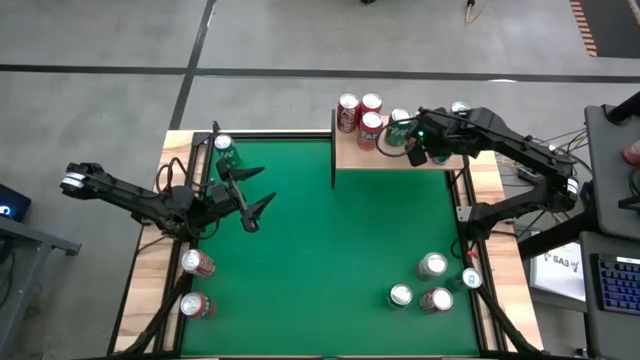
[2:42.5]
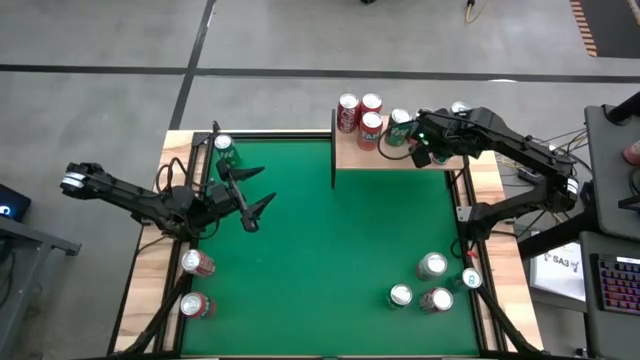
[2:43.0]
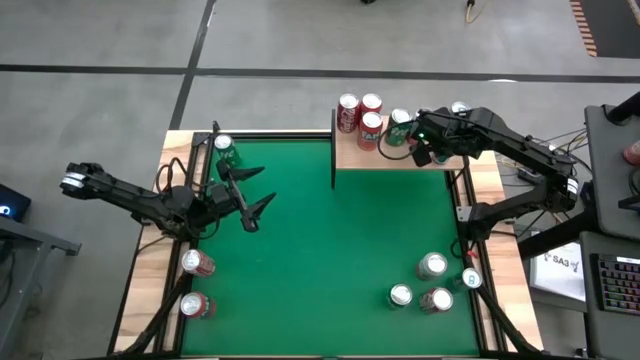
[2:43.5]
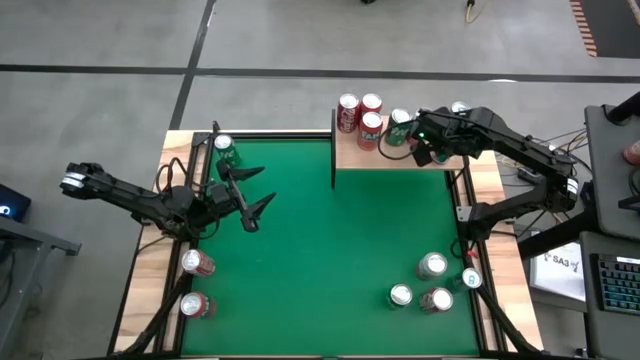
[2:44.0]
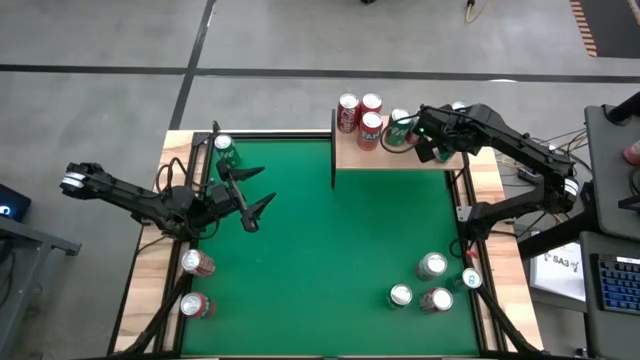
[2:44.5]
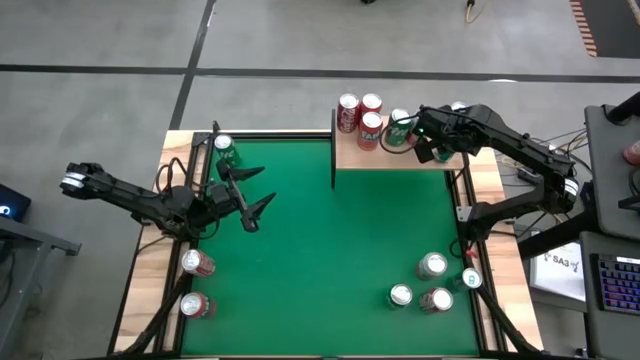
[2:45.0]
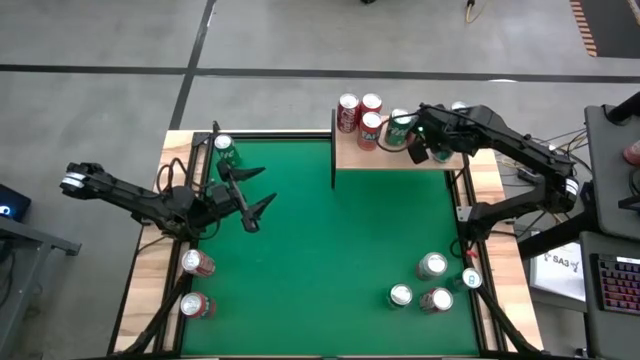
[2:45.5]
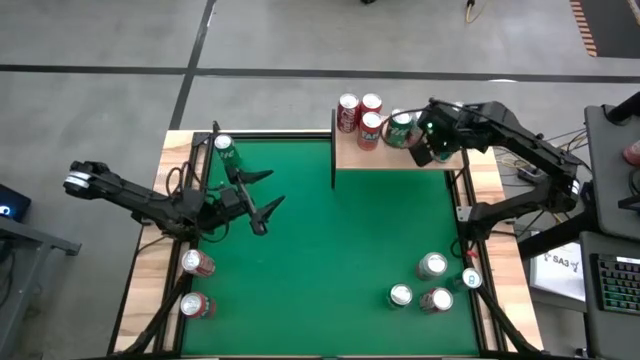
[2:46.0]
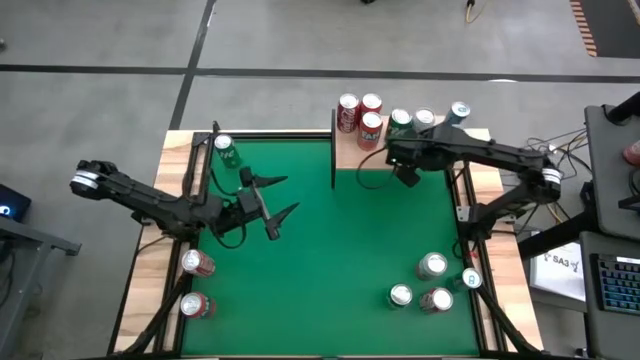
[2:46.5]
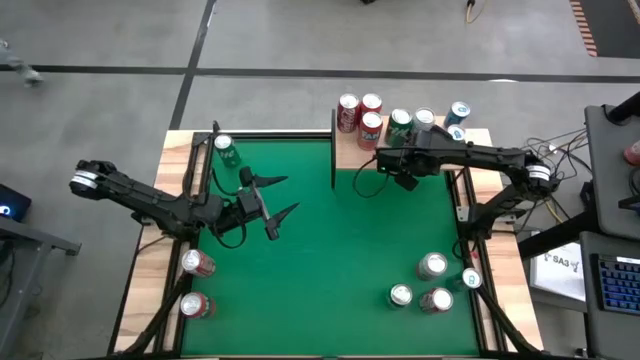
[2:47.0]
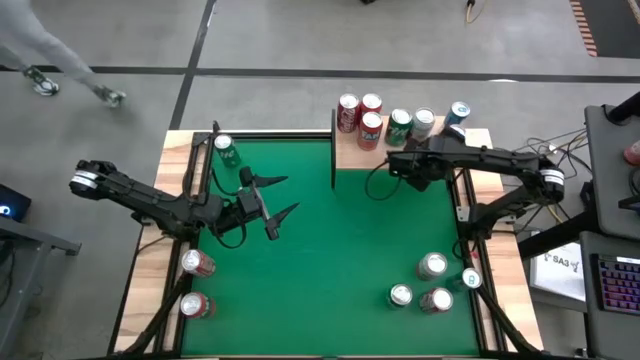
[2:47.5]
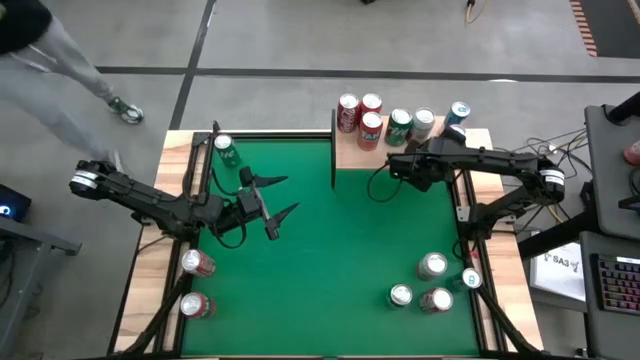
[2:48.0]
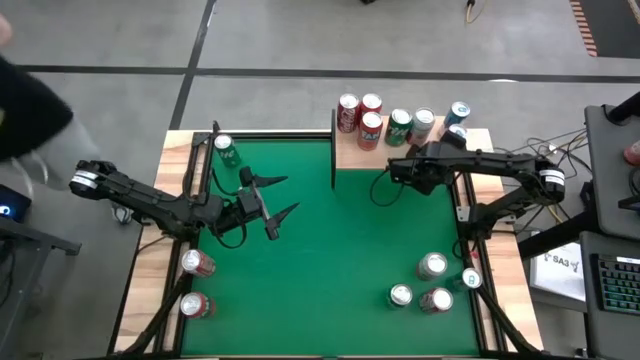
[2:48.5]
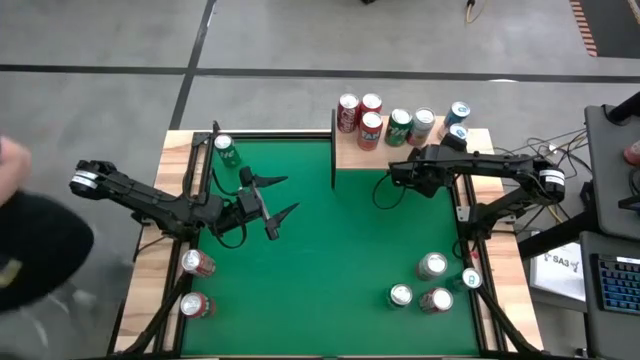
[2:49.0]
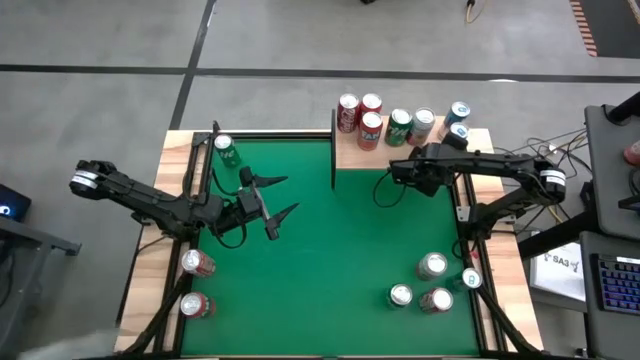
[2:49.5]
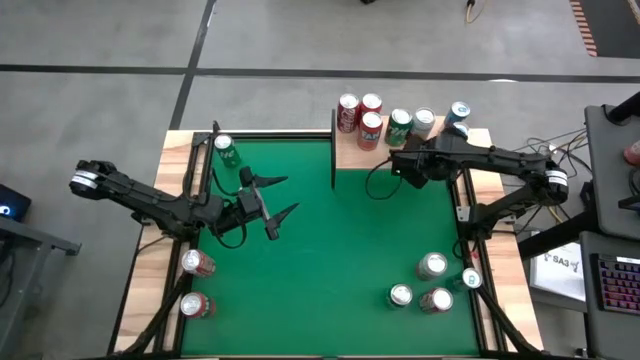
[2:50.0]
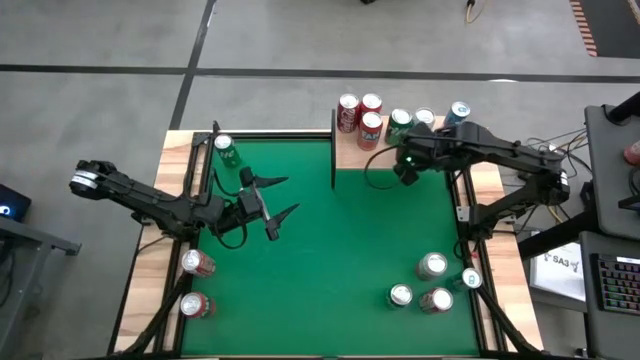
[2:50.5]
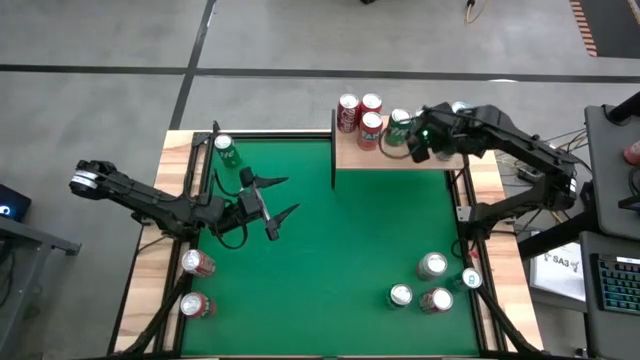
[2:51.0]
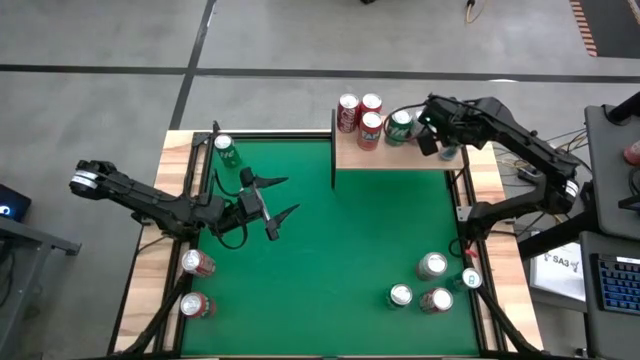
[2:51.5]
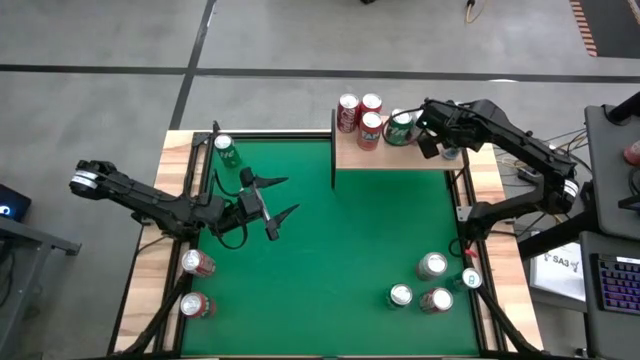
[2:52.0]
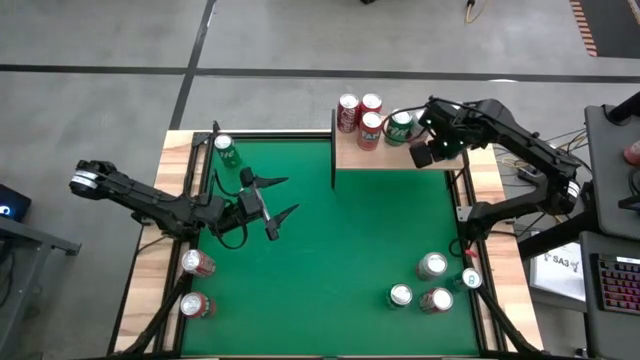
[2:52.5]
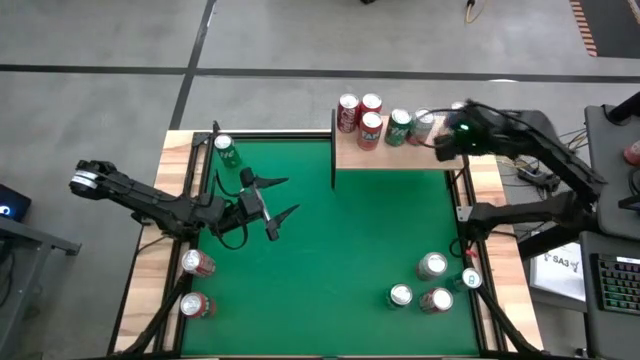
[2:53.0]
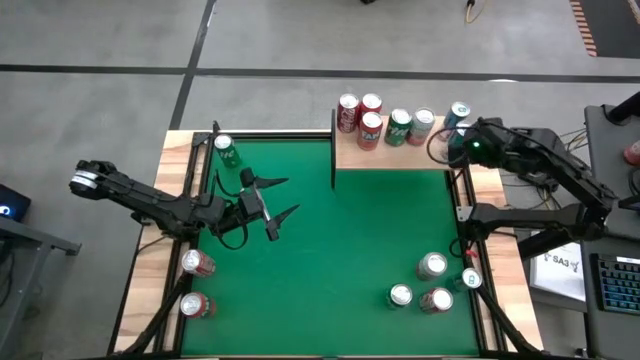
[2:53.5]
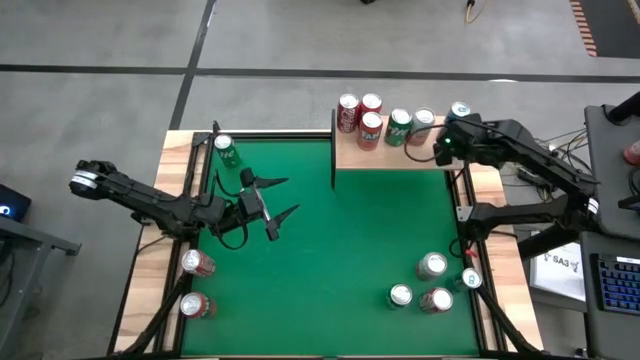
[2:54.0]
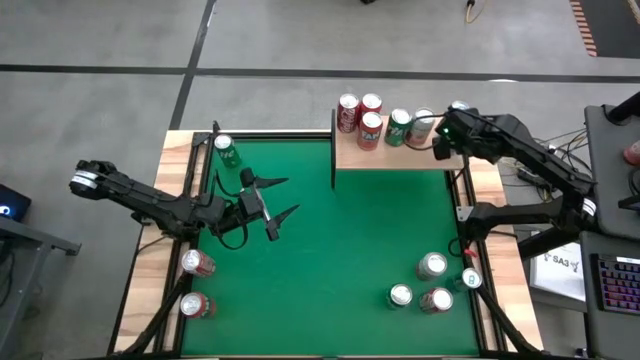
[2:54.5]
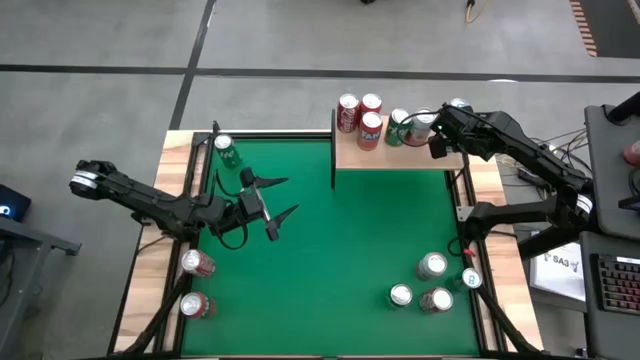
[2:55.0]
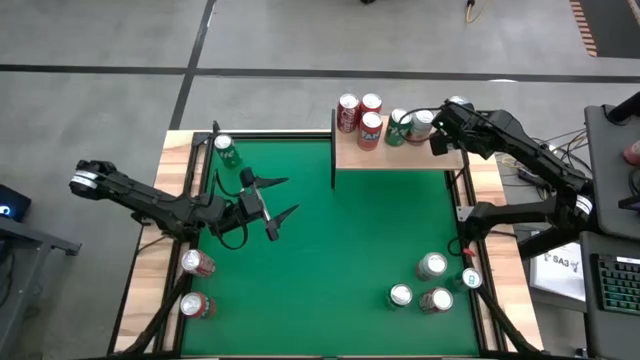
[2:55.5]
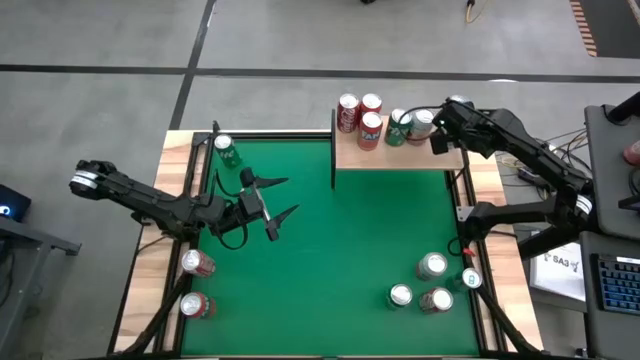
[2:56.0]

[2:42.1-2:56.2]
Task: Place canned beverage on shelf
Put the top blue soda can on the shelf aligned with the other blue soda can

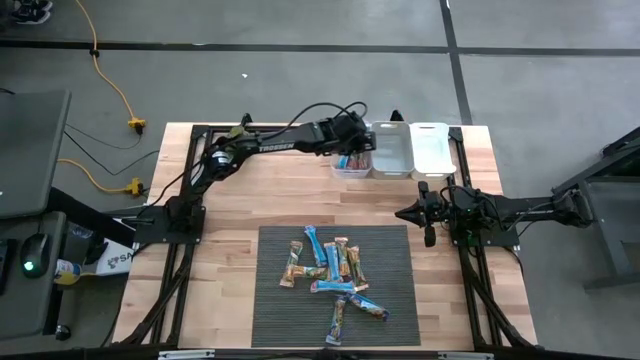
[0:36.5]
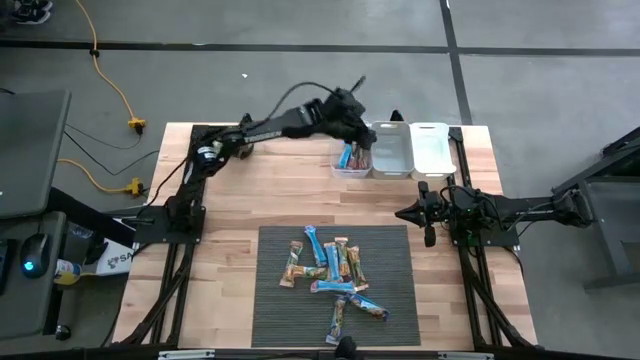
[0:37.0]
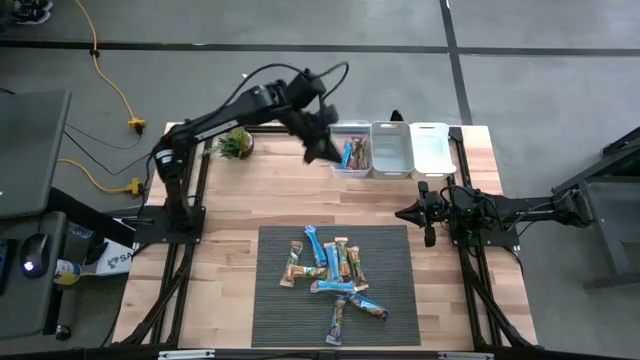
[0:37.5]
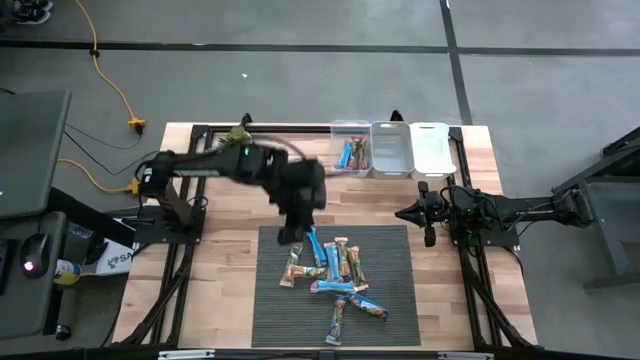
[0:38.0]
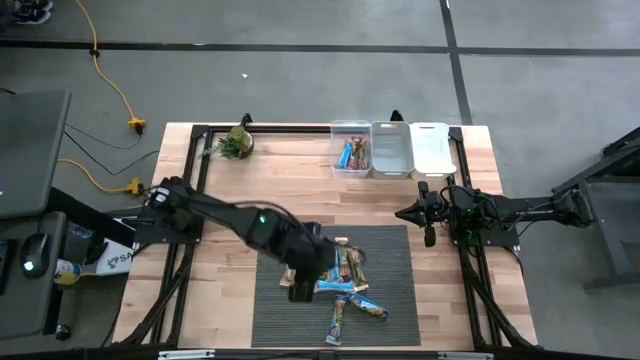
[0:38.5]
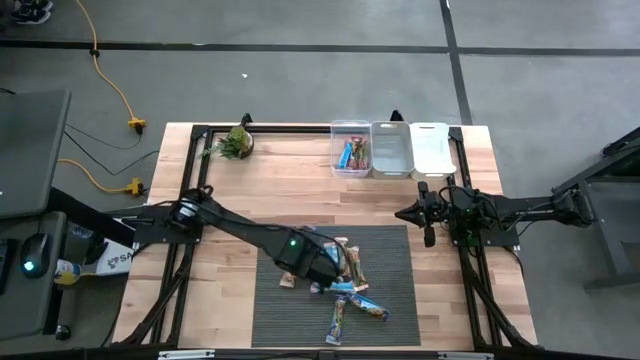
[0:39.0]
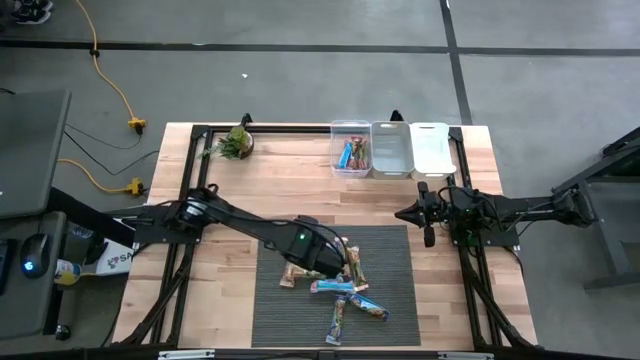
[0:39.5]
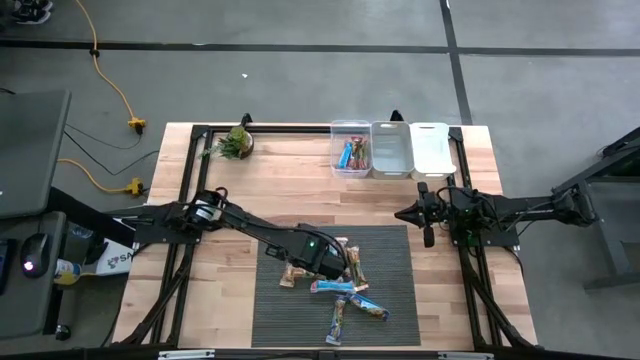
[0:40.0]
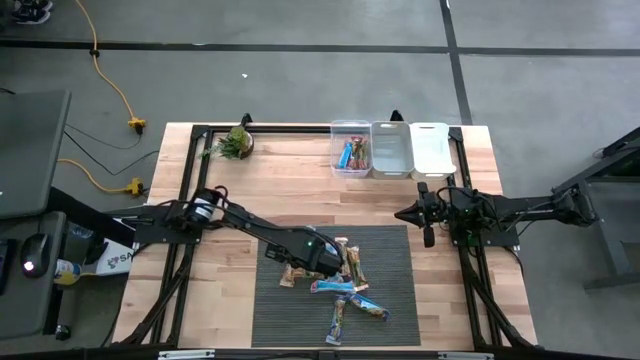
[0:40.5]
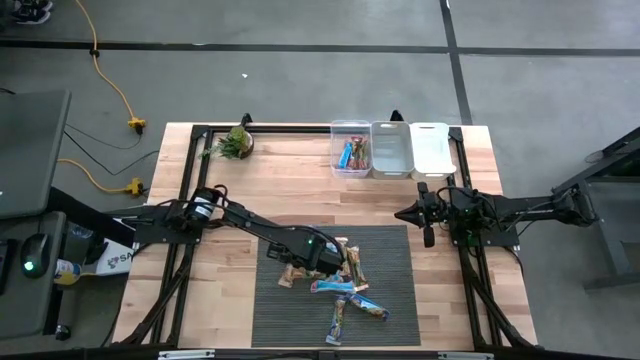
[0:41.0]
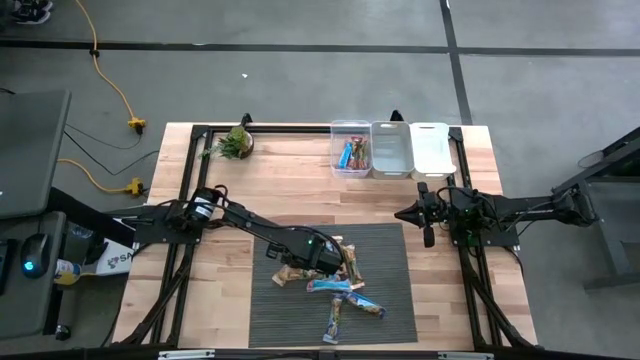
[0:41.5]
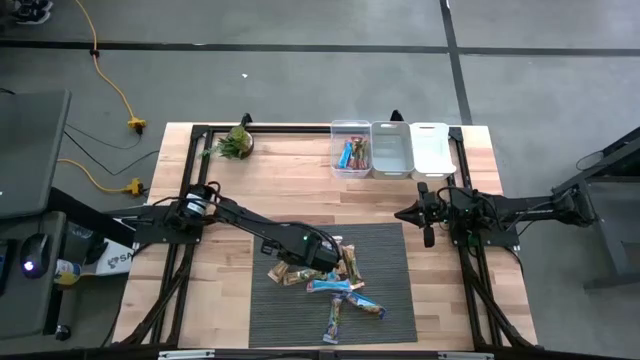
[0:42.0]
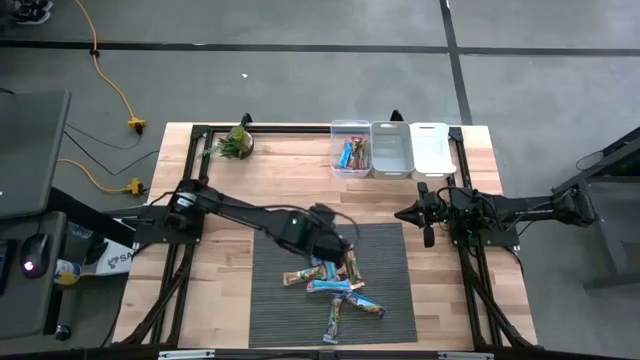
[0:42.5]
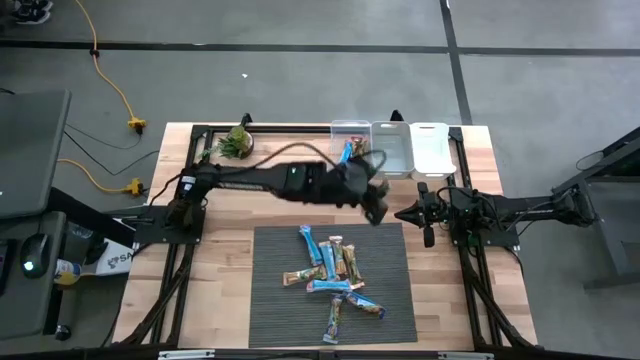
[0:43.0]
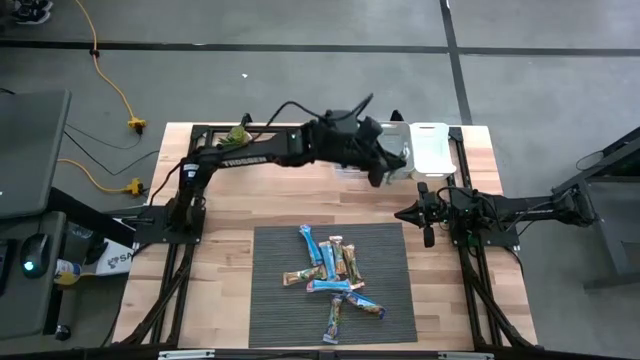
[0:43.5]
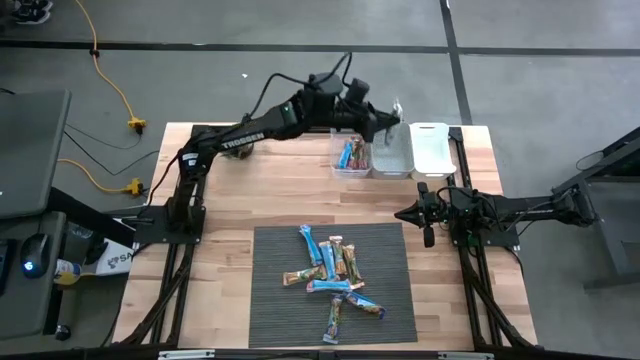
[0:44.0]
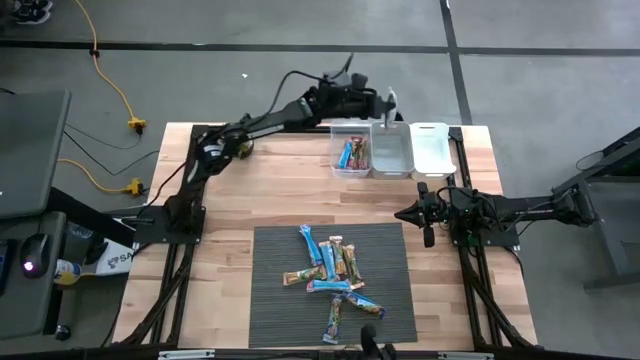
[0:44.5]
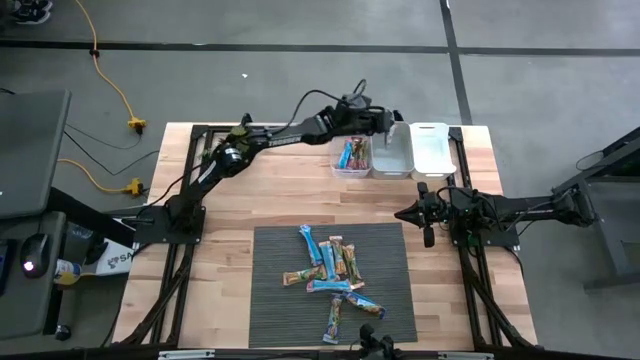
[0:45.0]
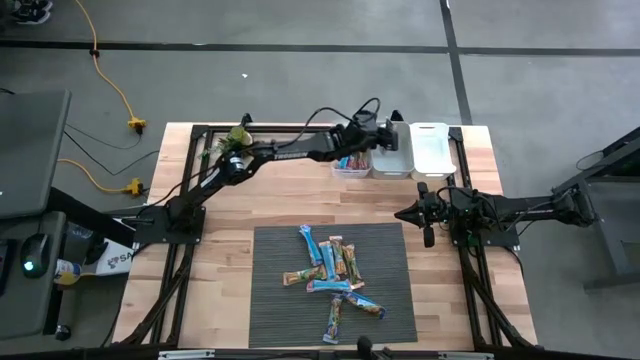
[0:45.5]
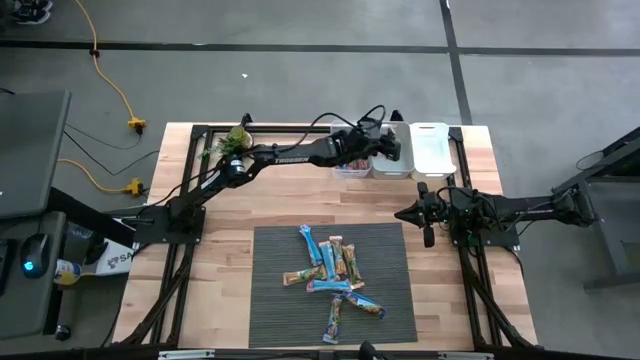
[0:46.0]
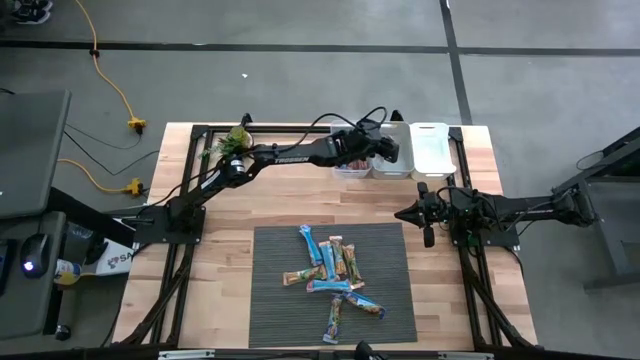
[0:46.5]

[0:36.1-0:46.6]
Task: Pick and place Granola Bars by type
Put the orange granola bar into the gray bin
